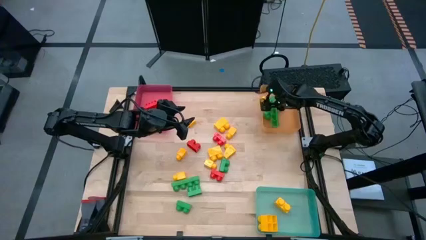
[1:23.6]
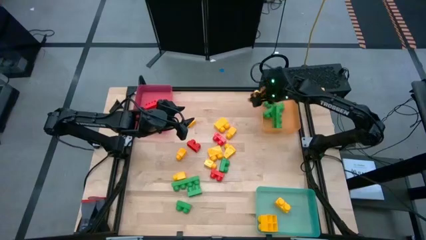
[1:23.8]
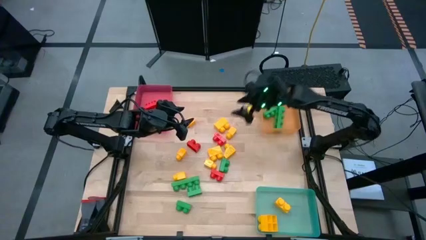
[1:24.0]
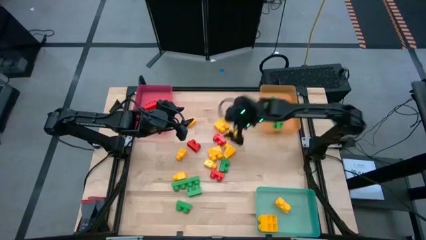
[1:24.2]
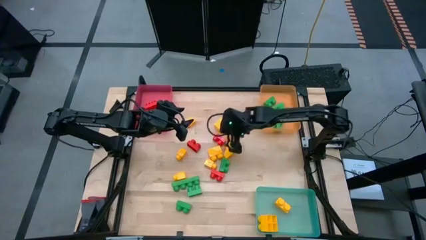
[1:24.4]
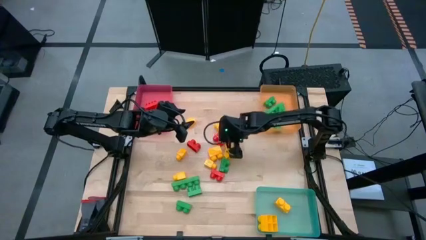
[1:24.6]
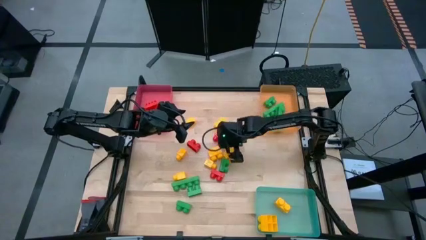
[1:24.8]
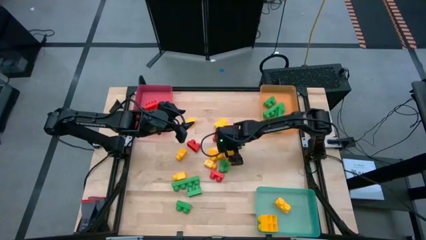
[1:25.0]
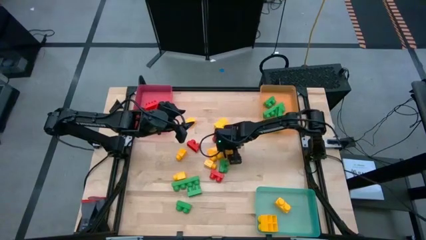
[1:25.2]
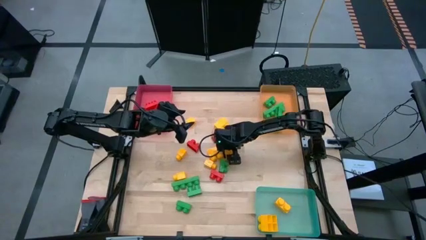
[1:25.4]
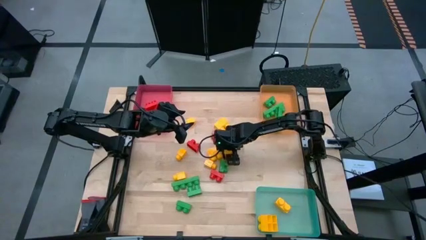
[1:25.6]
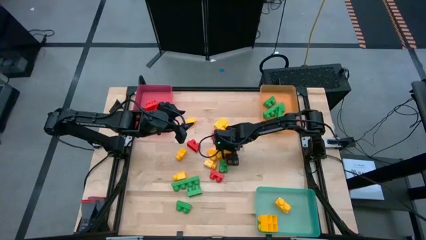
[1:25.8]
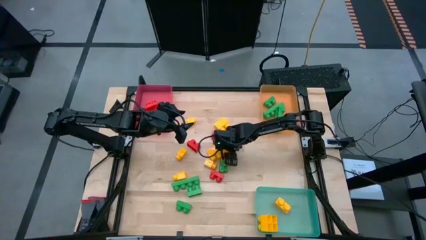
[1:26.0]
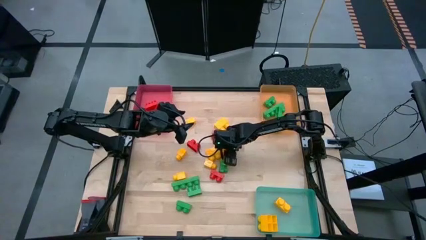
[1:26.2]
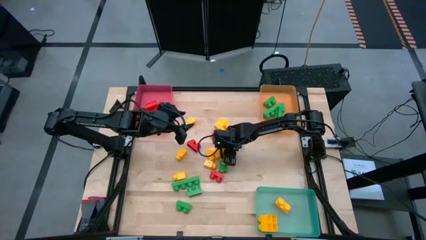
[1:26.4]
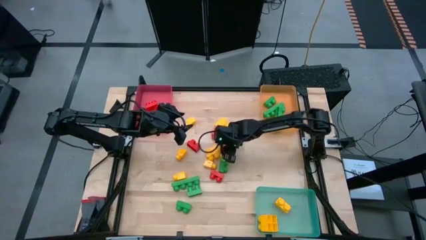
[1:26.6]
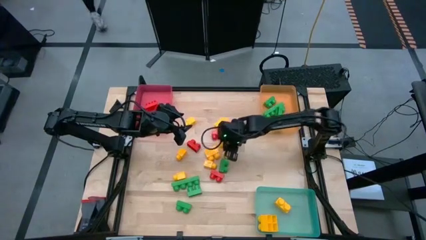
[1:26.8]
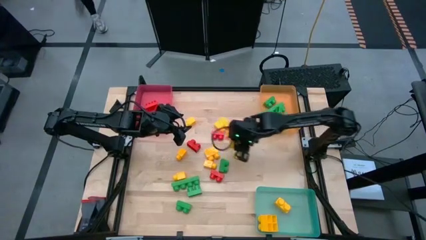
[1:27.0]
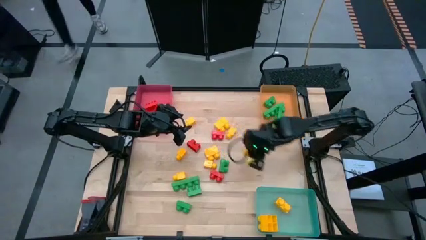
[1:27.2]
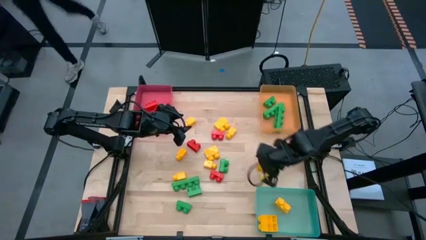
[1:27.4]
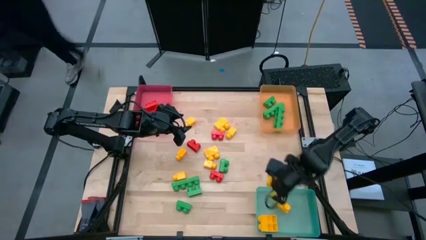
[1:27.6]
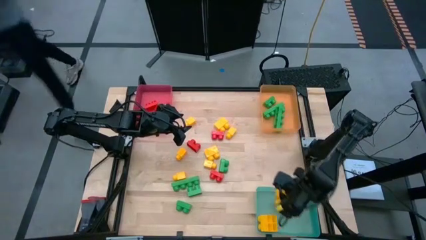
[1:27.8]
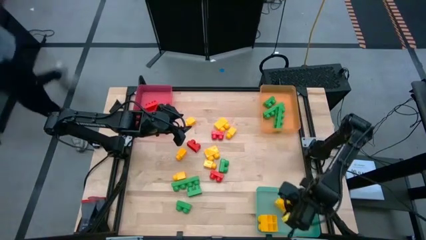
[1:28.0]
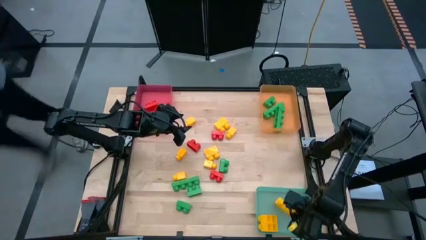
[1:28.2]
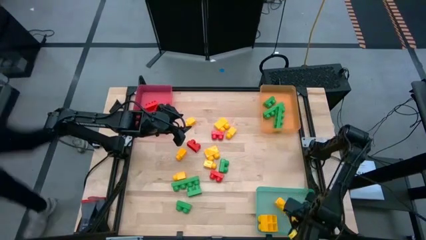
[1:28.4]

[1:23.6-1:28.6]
Task: Sort blocks
Put the yellow game piece into the blue bin

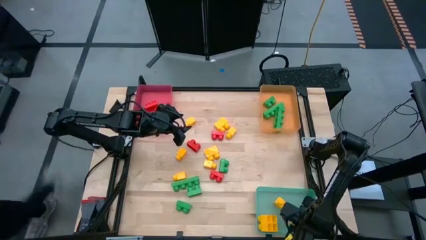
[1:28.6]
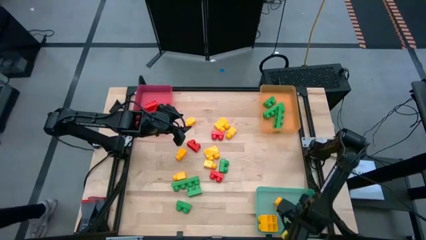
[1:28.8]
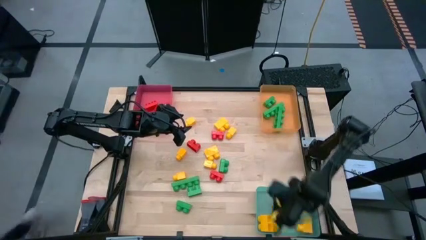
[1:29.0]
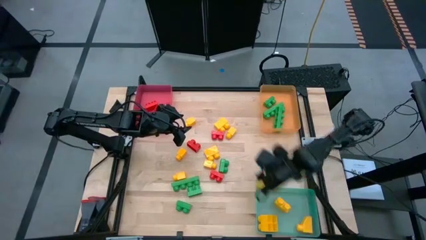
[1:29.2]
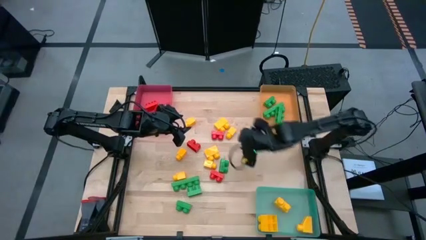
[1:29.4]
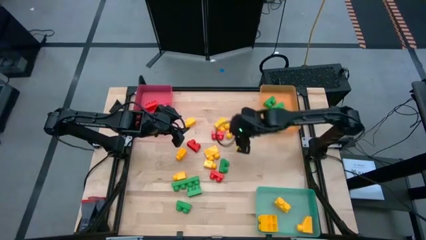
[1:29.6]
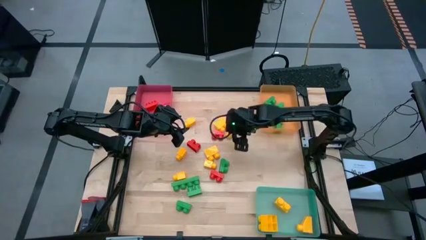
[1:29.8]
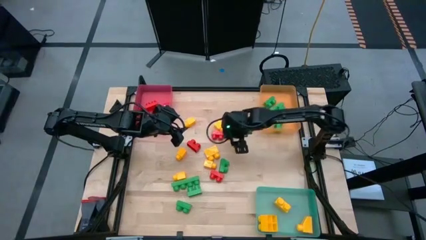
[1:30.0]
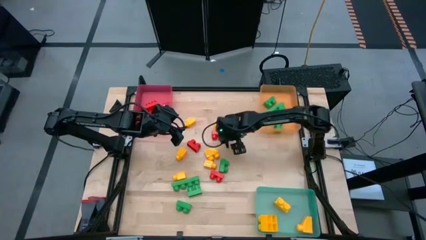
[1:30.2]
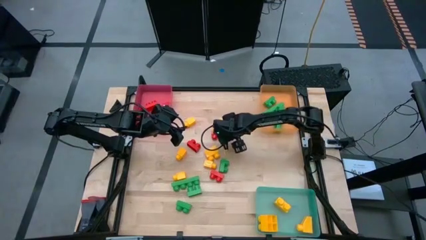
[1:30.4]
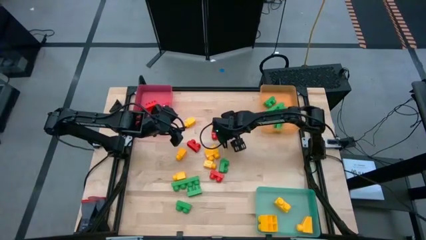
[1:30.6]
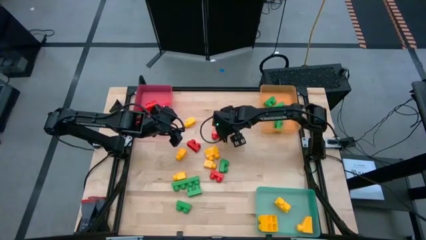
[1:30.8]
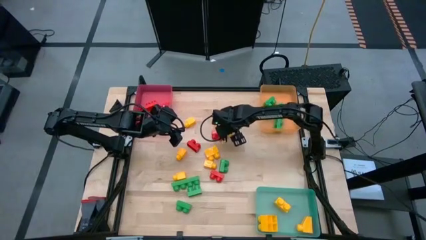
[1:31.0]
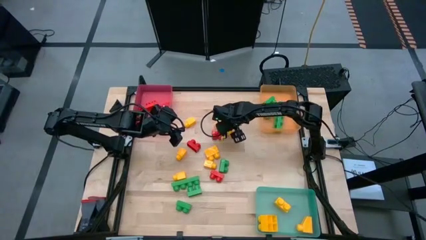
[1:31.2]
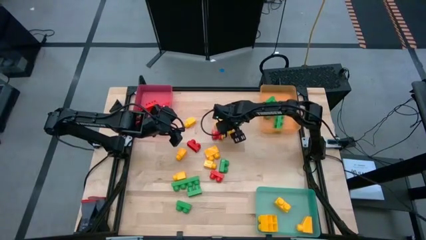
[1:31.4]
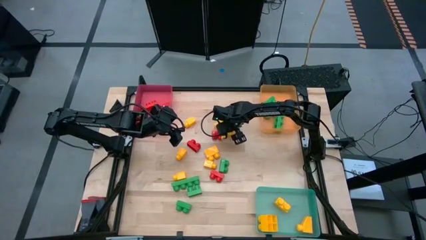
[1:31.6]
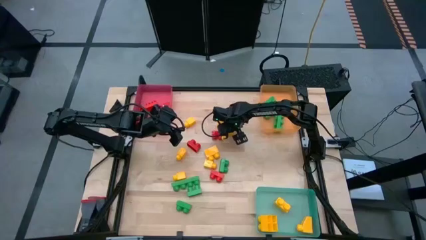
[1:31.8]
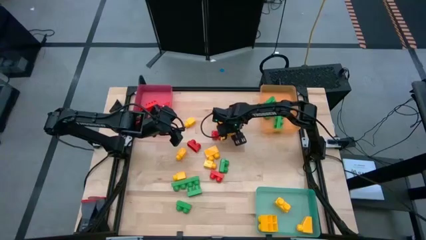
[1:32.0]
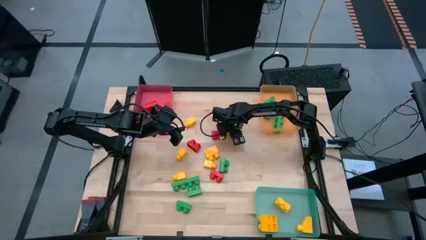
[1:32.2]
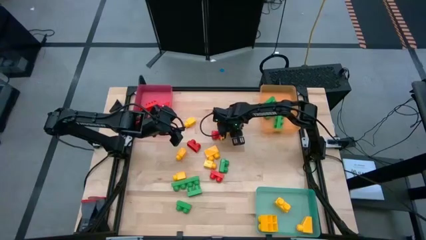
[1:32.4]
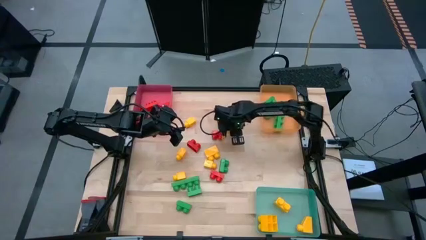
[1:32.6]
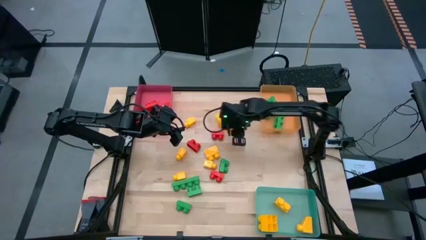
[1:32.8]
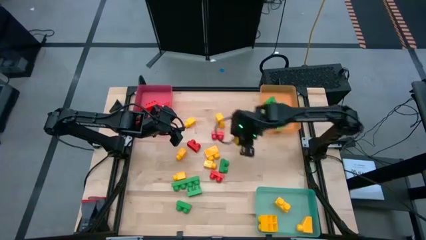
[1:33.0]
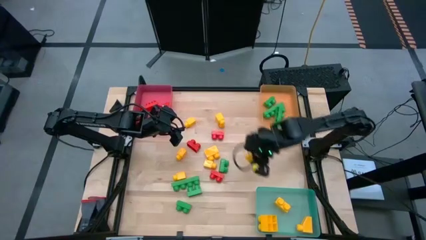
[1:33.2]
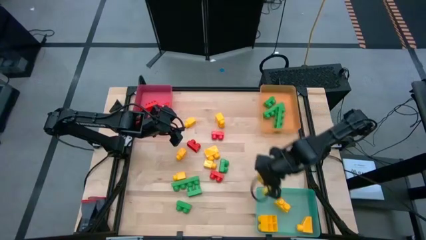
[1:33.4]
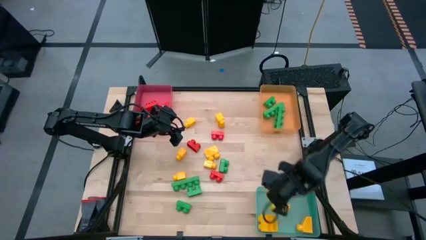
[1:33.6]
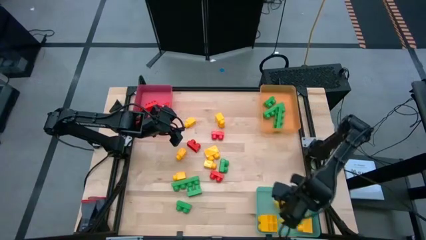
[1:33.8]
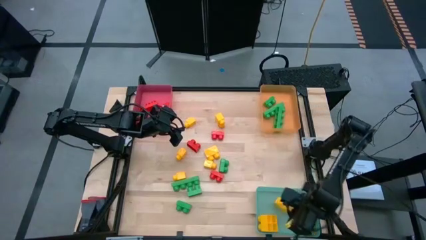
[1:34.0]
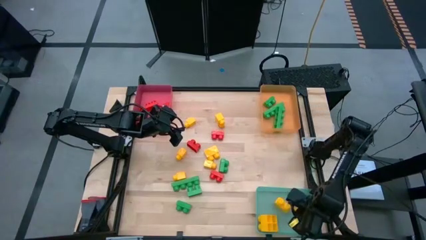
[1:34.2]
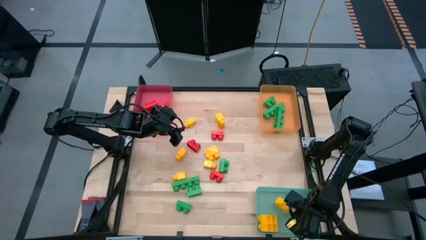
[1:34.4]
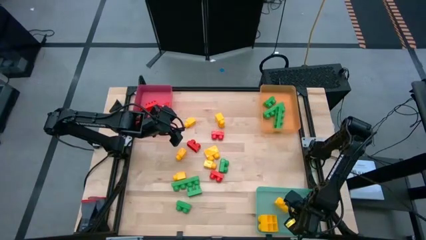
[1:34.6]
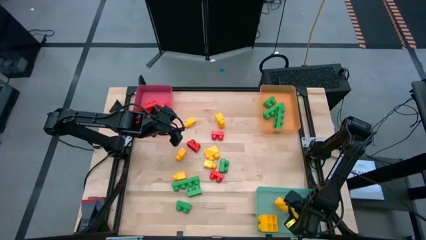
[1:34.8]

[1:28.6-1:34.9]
Put the yellow game piece into the blue bin

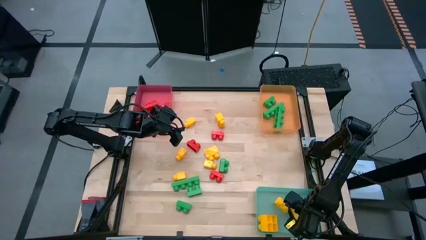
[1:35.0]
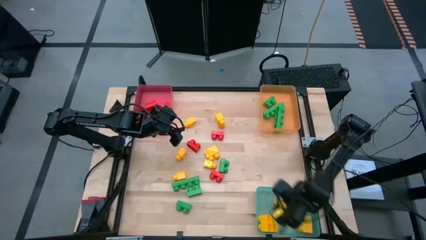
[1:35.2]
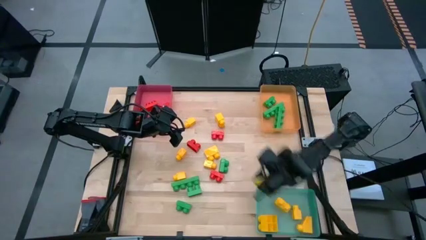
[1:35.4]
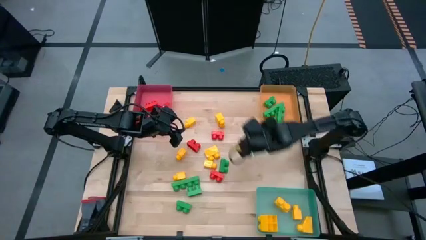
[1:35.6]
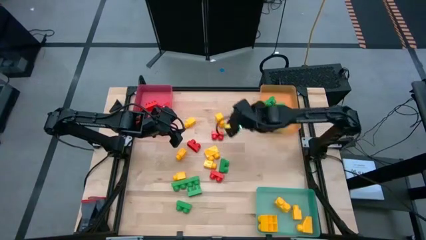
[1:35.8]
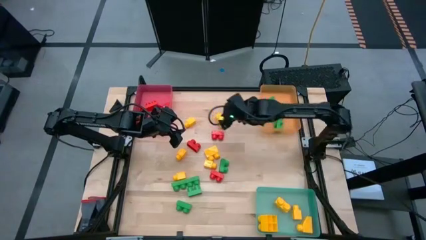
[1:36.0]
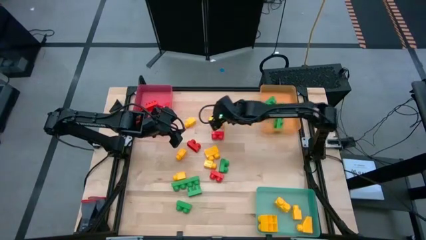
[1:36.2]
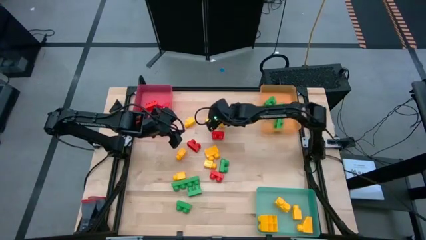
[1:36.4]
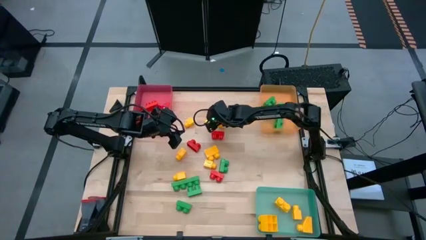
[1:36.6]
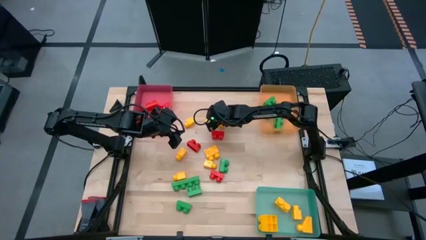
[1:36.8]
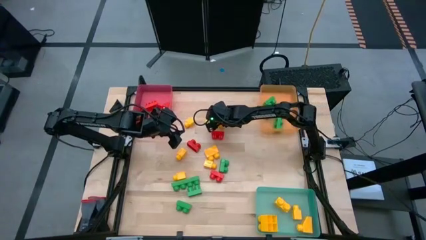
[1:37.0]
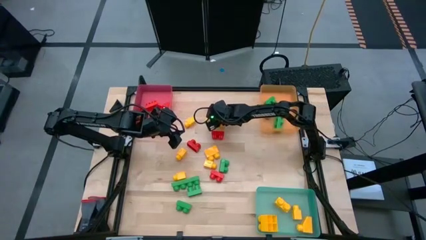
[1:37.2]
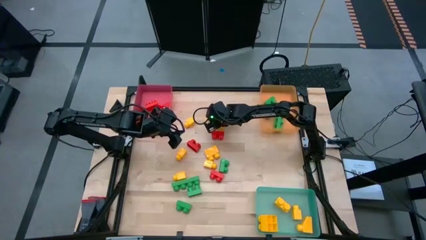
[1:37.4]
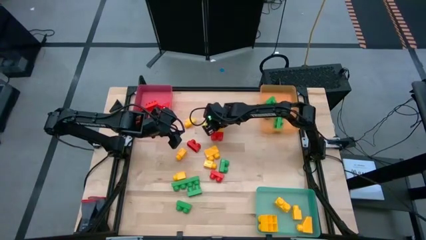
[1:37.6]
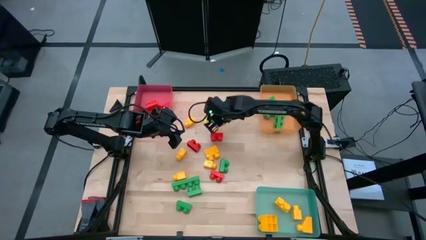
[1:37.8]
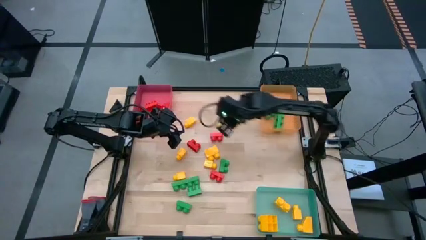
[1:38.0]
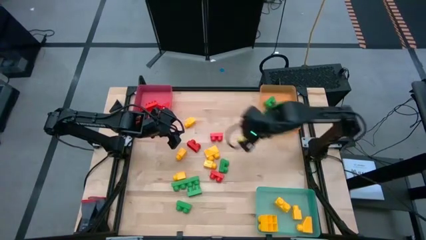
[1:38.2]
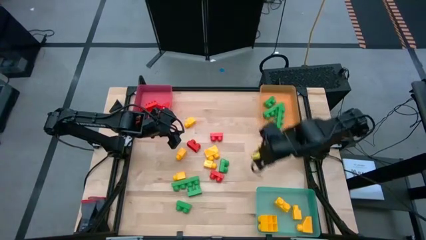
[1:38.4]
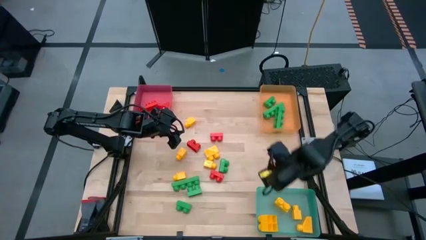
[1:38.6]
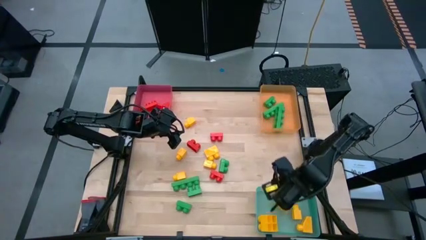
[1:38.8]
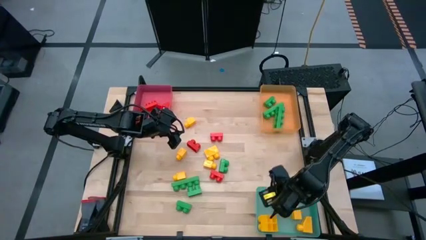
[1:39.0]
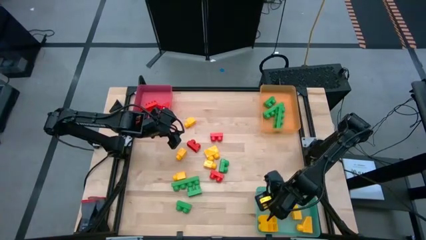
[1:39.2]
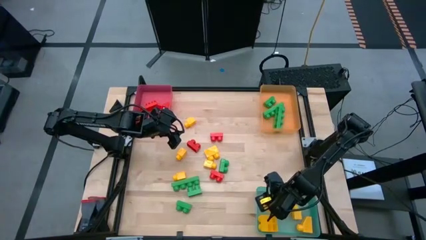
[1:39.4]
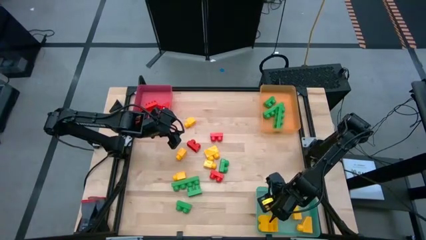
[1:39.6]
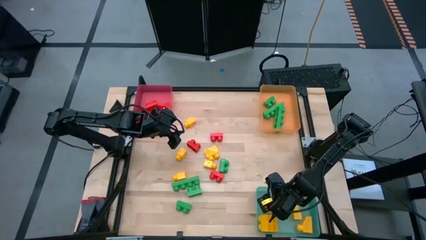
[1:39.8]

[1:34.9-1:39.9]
Put the yellow game piece into the blue bin

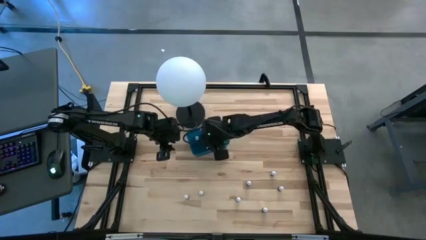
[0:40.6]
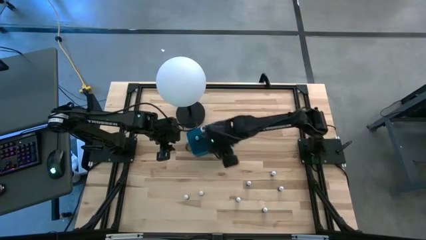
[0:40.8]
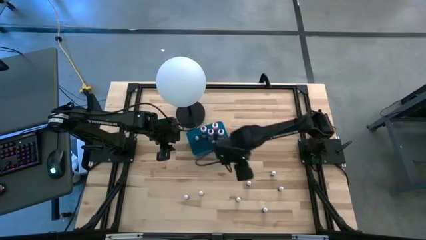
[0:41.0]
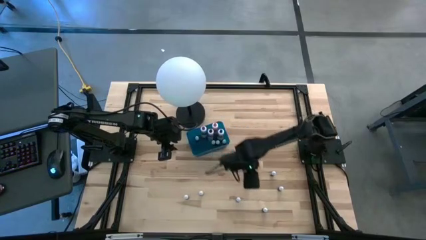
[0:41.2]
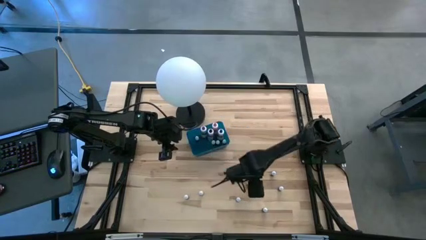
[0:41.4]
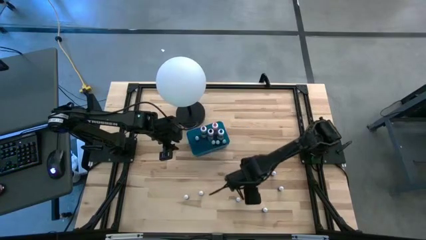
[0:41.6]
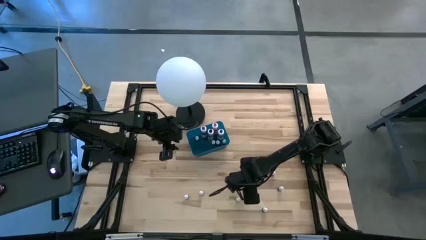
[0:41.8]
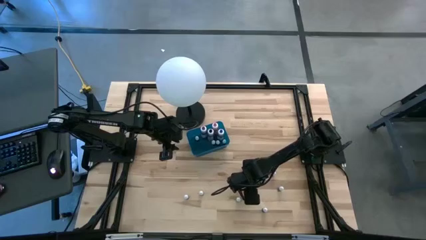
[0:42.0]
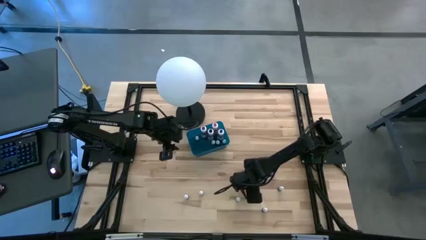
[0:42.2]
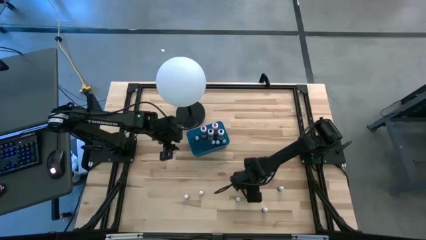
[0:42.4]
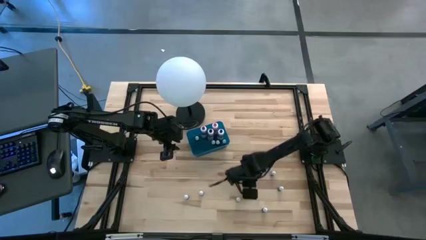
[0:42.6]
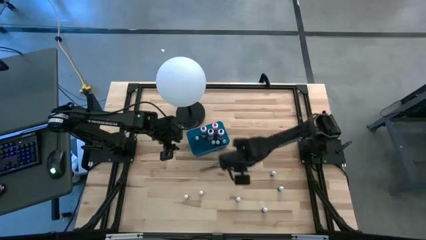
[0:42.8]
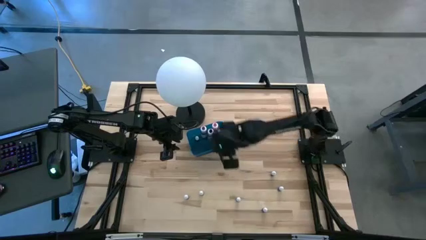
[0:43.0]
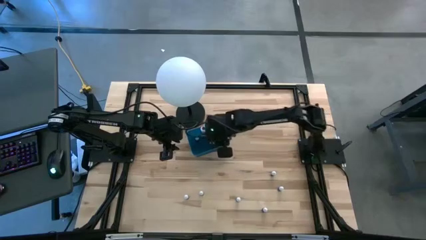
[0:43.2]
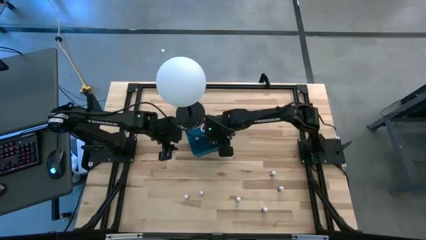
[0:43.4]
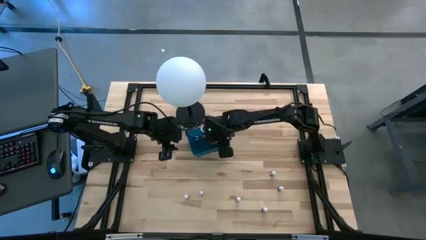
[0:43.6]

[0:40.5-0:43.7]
Task: Pick & Place food coloring
Put the small red food coloring bottle into the blue container
